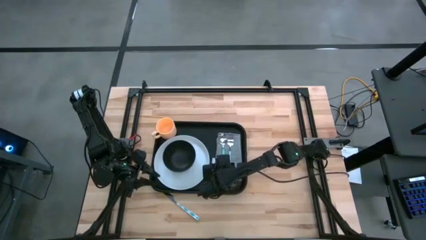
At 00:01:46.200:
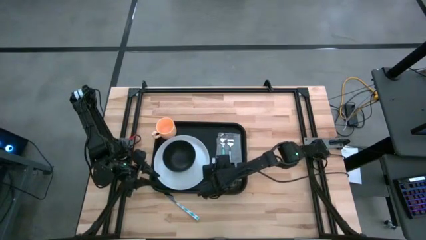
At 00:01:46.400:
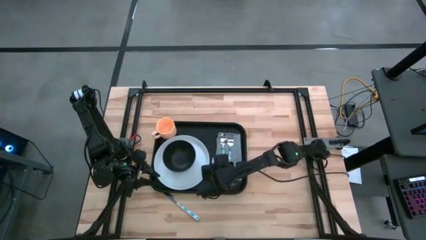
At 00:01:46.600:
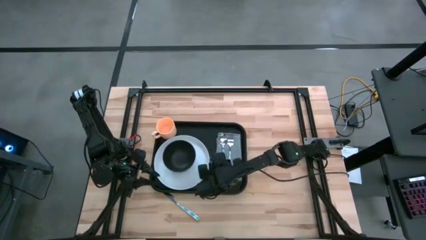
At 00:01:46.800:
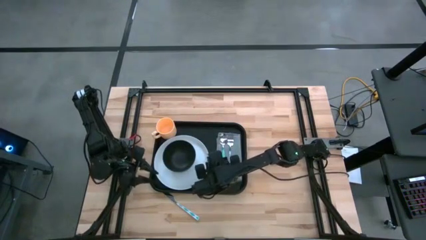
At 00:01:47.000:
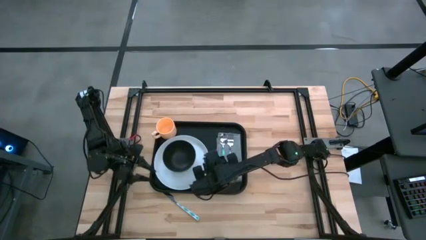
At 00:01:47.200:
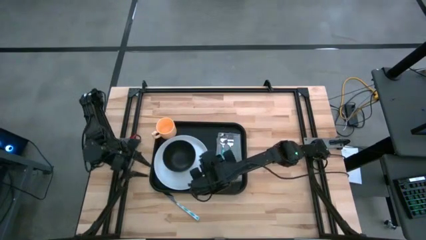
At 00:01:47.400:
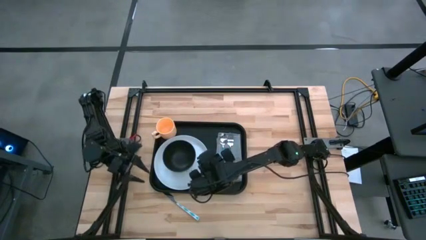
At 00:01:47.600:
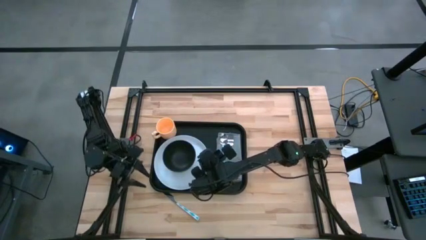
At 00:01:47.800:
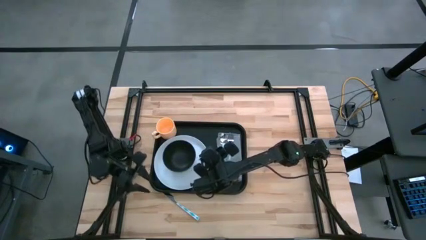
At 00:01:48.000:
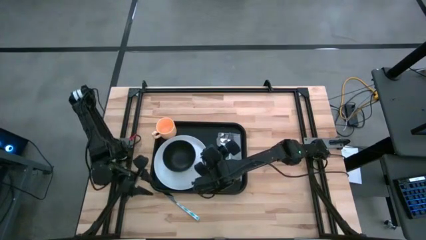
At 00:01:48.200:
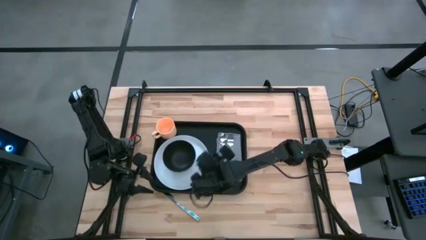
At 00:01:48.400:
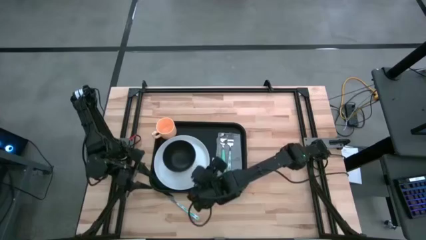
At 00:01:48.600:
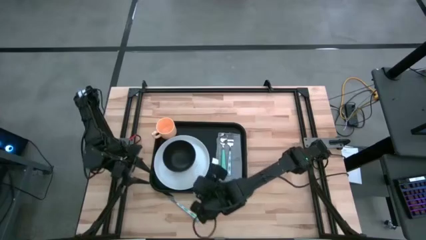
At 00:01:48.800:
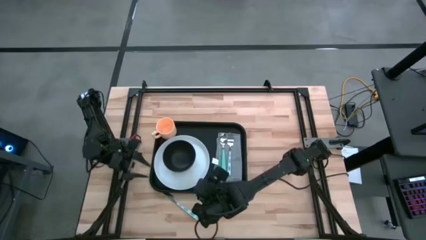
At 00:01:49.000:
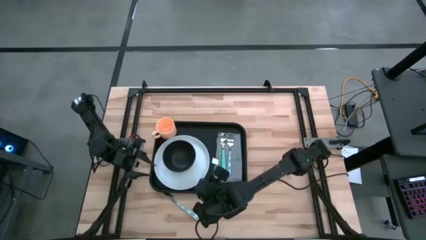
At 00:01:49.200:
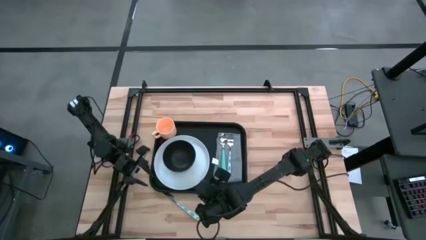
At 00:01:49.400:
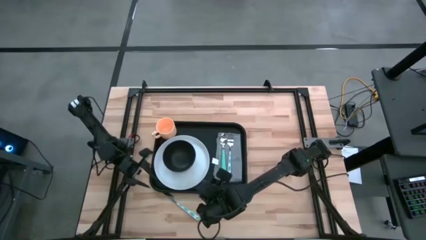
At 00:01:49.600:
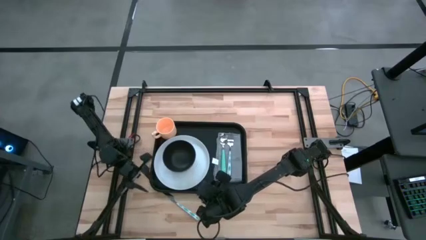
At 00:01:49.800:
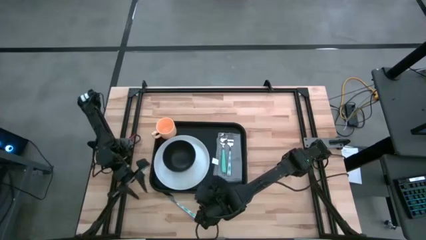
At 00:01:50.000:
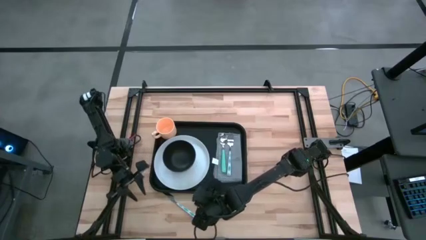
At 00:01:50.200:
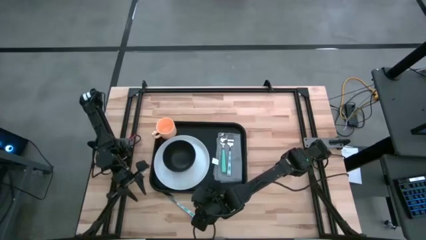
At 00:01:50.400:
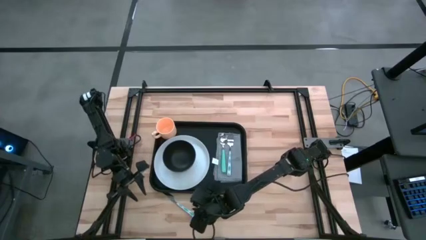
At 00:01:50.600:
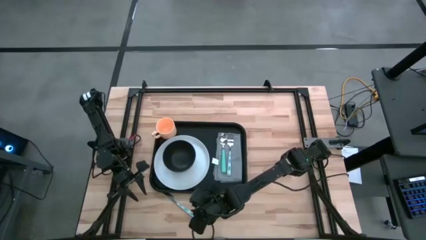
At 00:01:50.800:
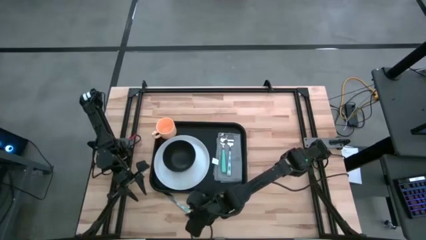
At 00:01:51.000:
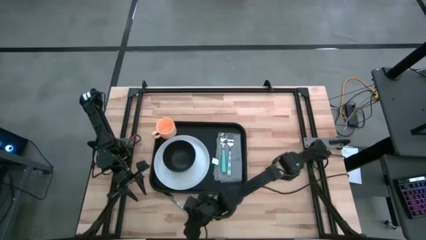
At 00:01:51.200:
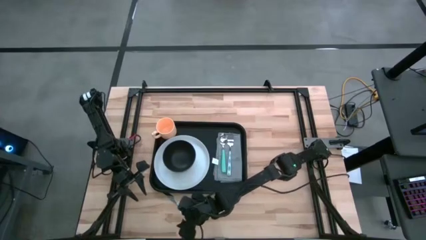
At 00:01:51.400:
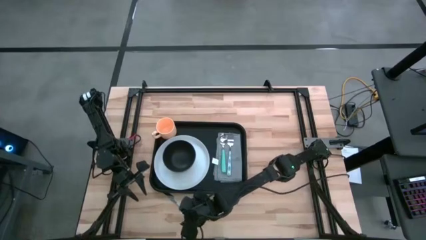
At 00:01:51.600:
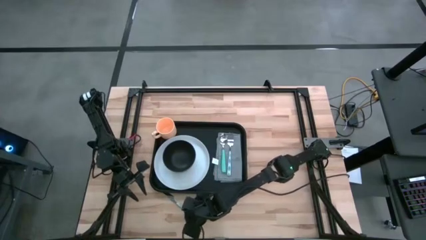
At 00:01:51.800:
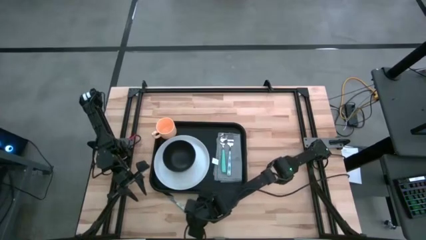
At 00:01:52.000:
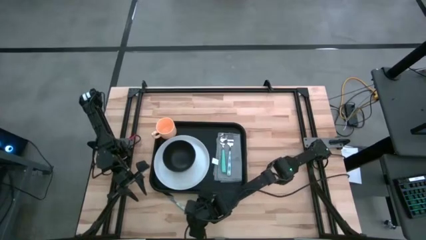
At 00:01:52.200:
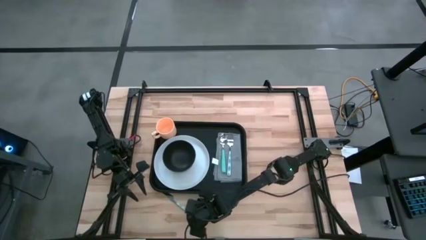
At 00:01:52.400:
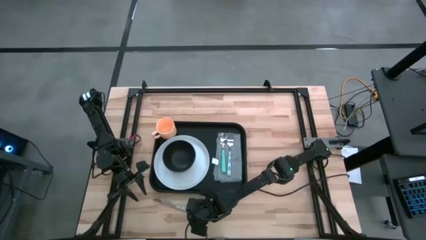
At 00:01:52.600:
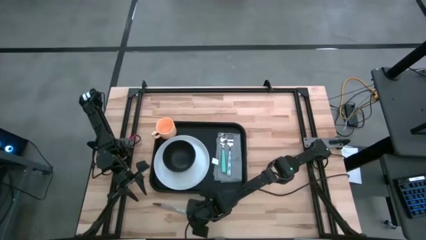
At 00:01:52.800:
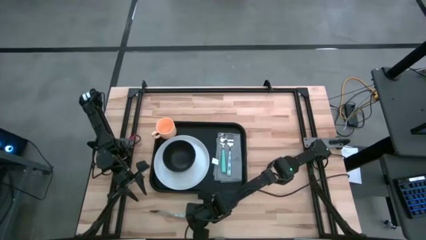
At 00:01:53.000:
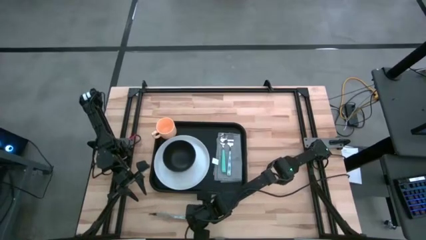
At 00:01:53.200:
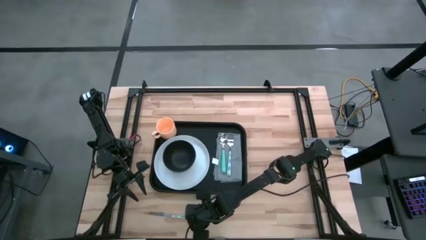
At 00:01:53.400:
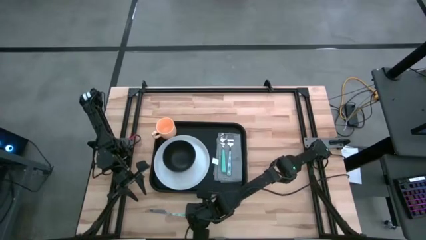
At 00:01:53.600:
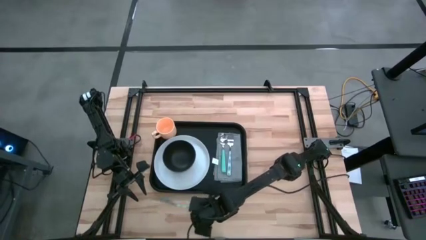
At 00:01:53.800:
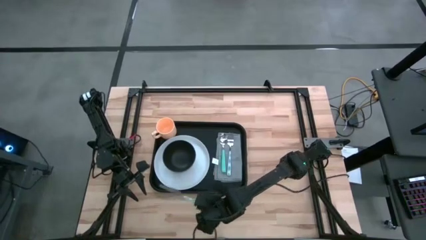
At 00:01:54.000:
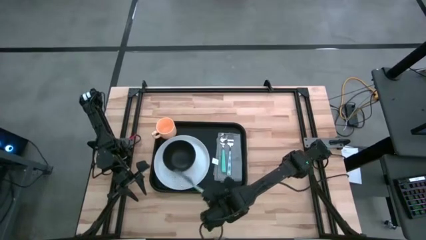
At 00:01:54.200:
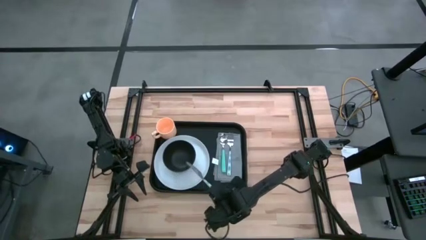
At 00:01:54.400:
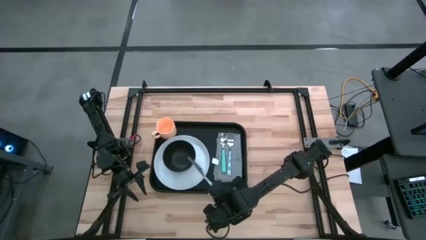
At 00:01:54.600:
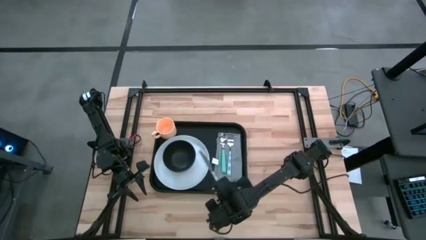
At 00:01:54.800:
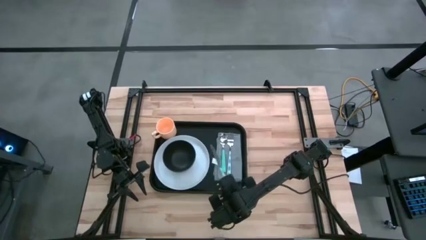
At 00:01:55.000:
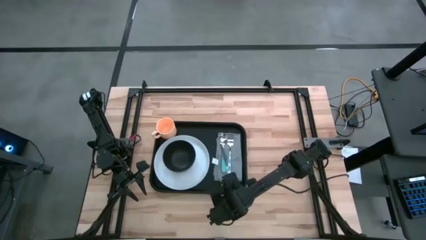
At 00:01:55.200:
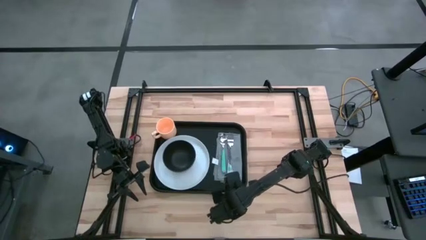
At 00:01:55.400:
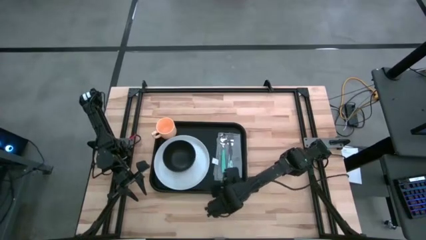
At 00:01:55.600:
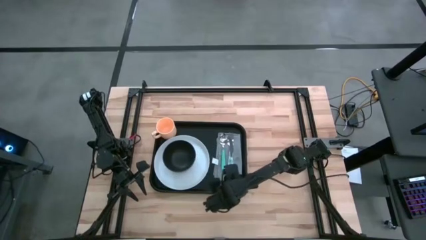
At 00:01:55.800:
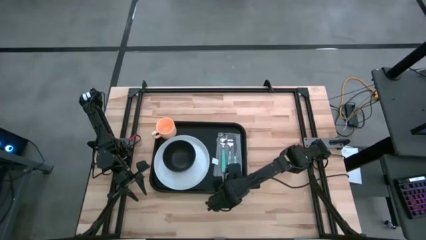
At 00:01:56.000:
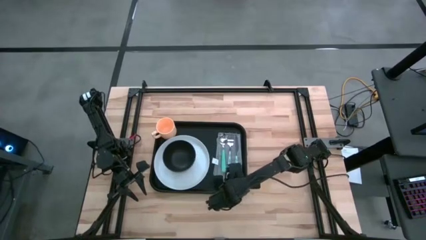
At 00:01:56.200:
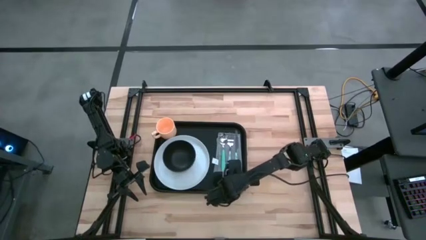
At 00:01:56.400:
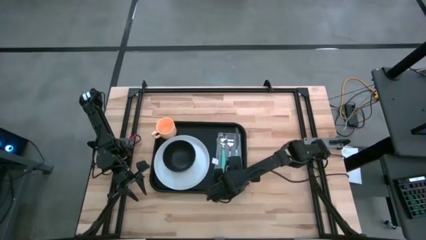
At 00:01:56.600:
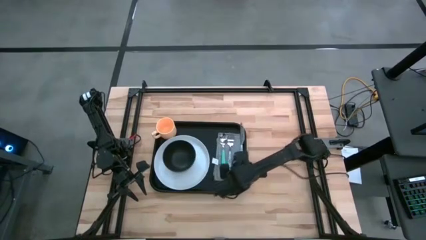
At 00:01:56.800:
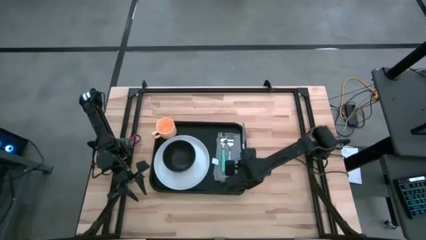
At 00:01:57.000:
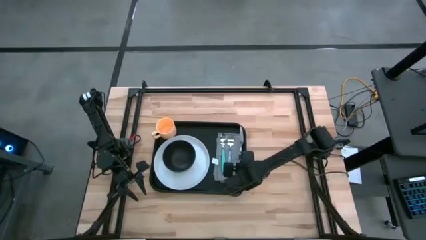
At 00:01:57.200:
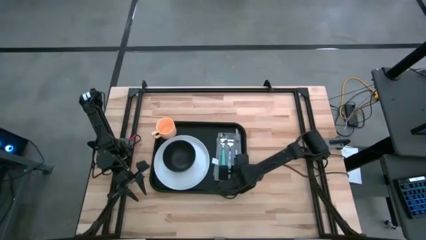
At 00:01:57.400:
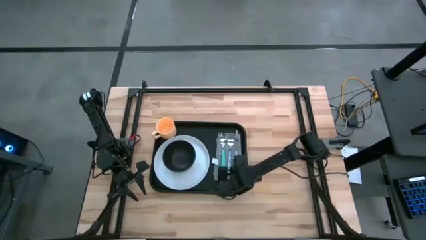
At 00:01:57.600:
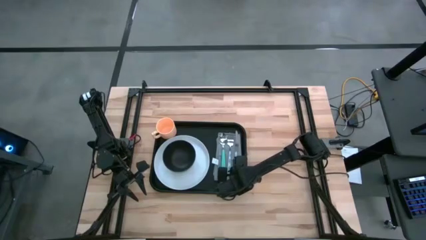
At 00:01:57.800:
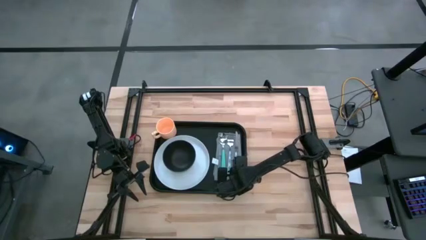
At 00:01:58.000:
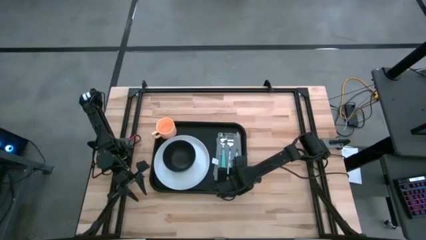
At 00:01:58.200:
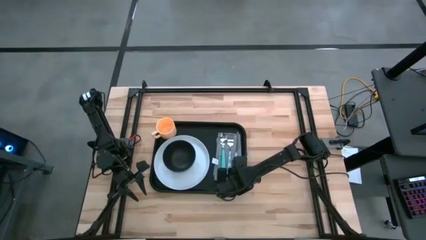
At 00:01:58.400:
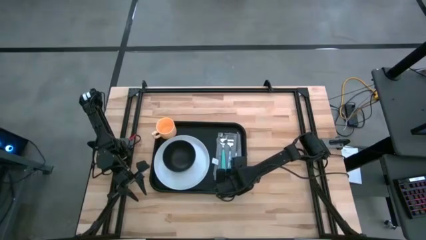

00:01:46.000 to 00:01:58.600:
Task: Set up tray
Put the green knife on the gray napkin to the right of the green spoon

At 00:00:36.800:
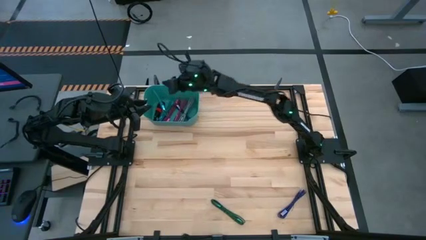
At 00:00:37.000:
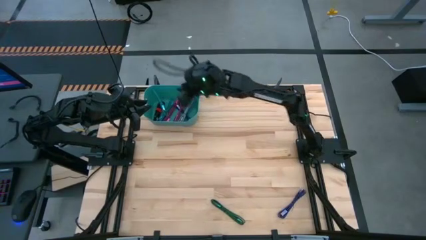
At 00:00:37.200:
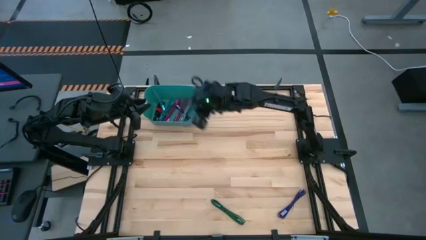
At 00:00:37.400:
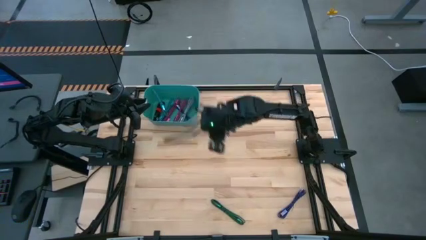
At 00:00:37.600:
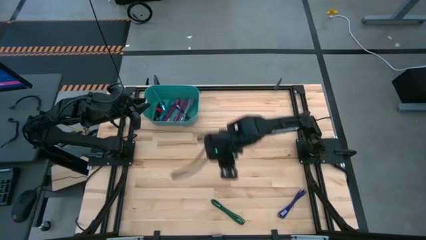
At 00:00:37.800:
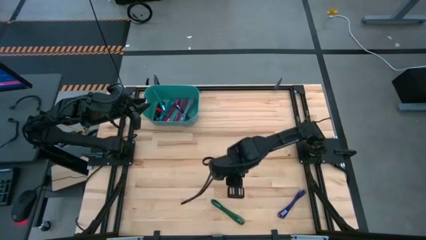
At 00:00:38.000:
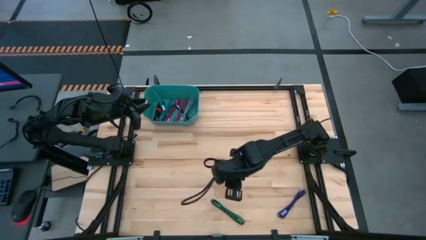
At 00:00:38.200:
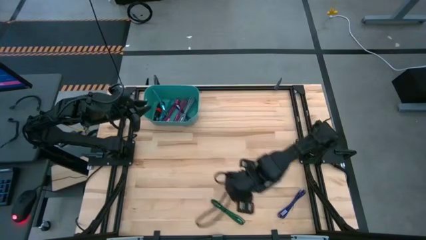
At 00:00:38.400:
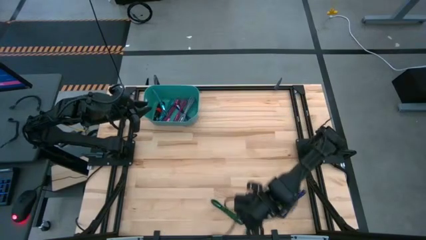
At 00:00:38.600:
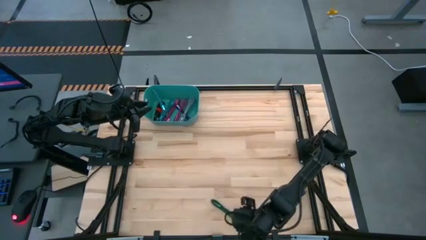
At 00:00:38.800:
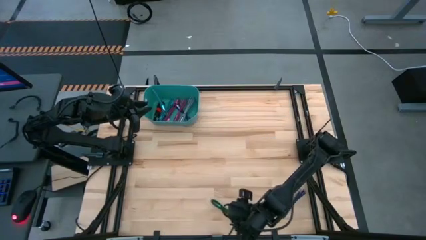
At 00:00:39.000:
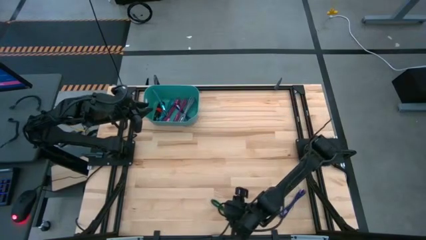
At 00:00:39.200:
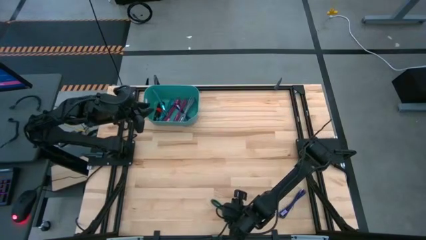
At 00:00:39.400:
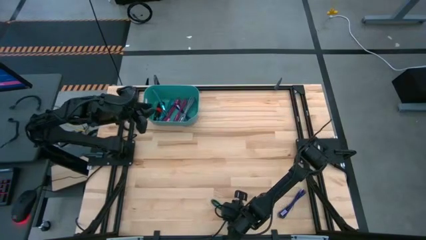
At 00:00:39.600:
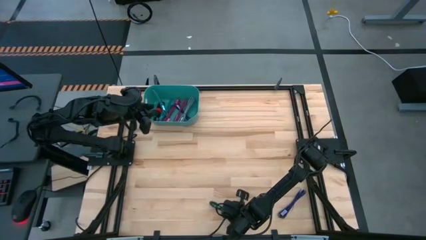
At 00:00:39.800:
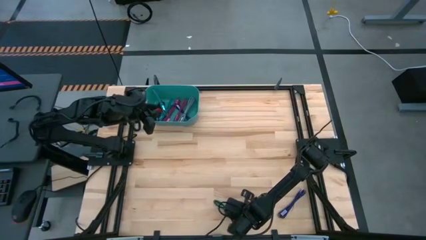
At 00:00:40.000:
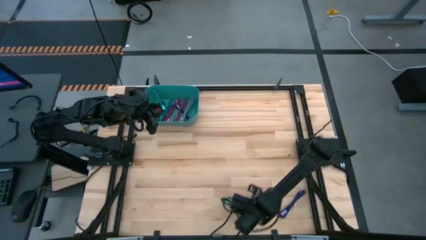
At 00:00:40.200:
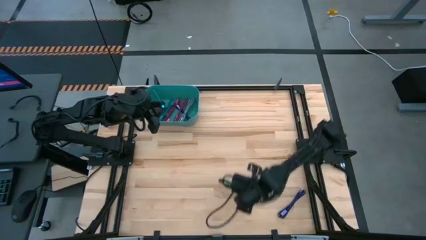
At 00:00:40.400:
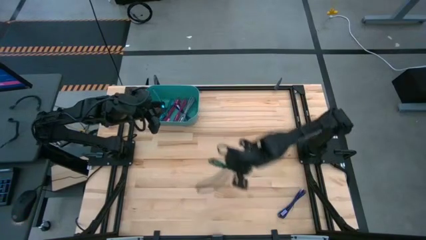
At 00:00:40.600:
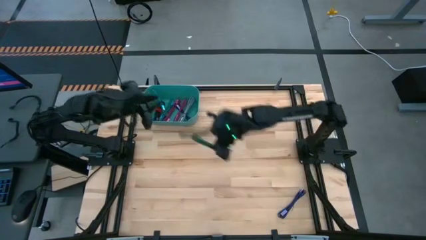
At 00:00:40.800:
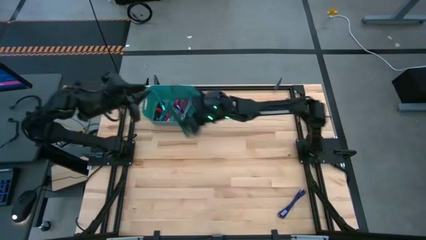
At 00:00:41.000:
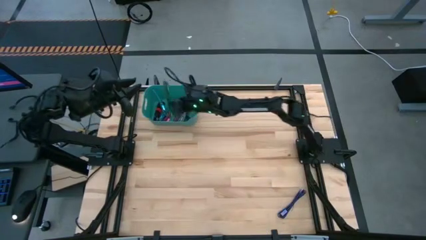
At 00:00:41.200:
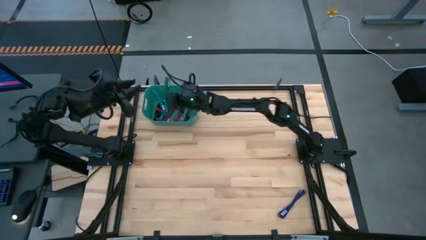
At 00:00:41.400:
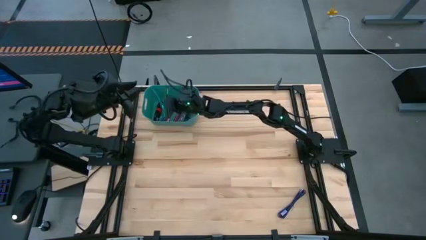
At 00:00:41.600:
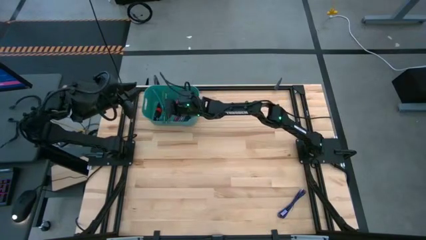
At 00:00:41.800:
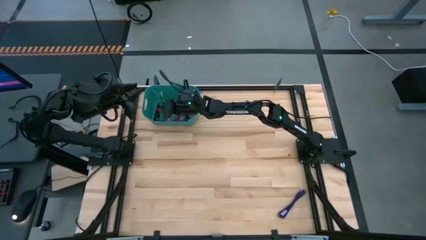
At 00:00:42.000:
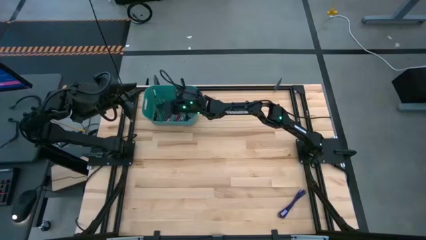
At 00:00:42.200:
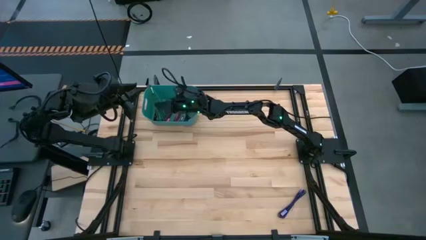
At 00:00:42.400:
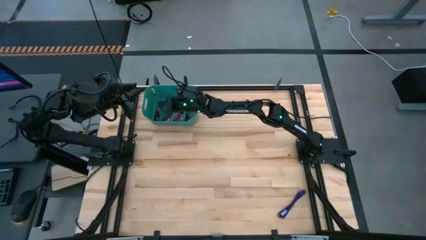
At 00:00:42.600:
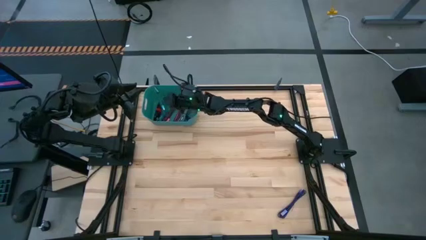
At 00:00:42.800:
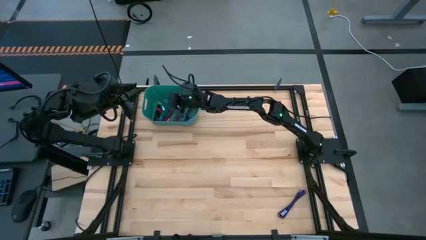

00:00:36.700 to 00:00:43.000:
Task: Pick and place USB-C Cables
Put the green USB charger cable into the green bin
